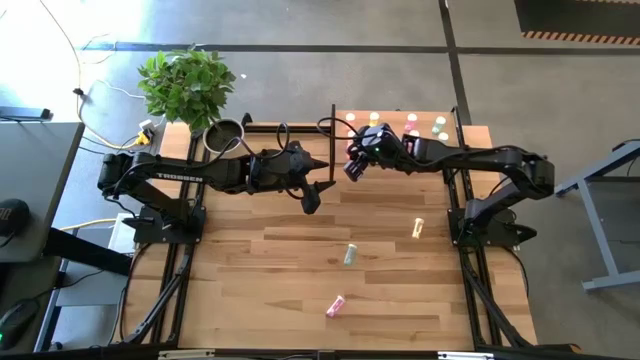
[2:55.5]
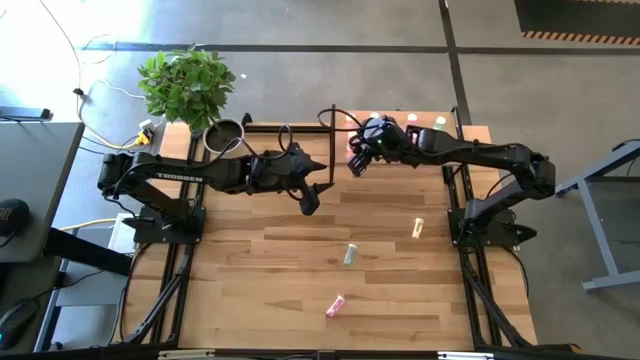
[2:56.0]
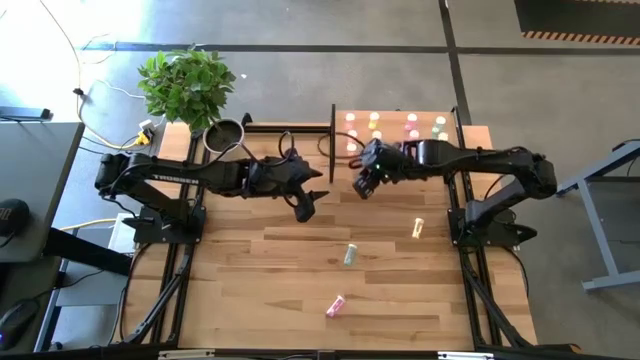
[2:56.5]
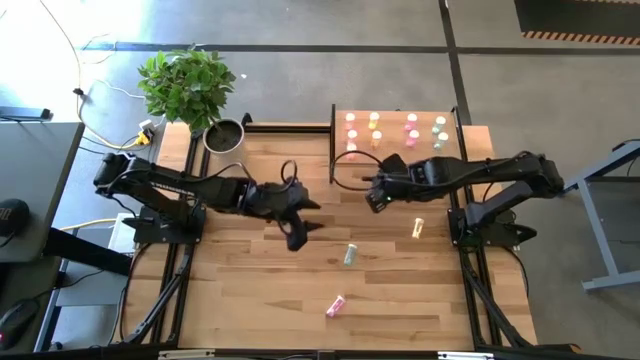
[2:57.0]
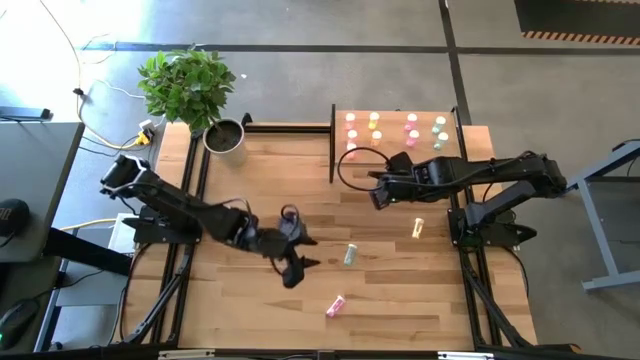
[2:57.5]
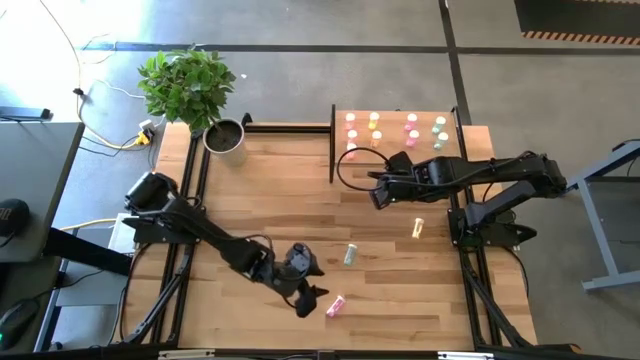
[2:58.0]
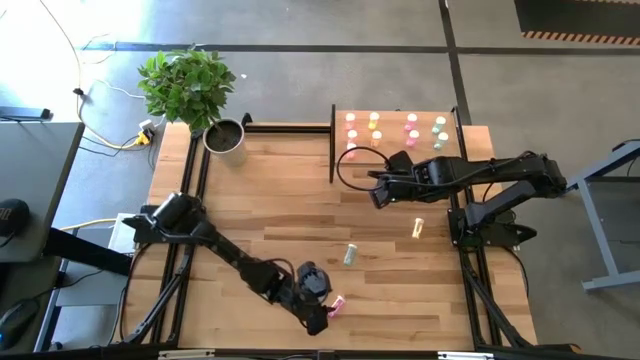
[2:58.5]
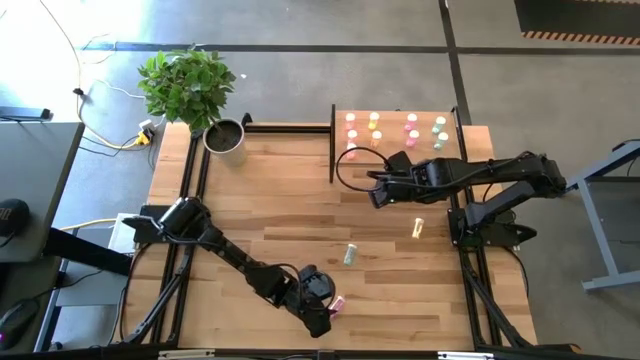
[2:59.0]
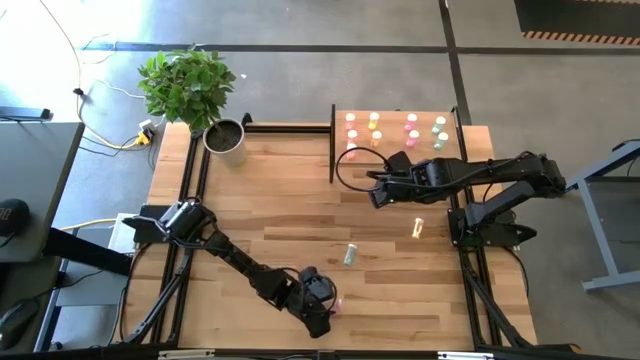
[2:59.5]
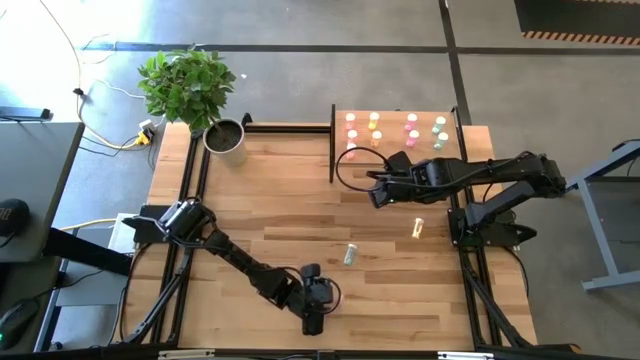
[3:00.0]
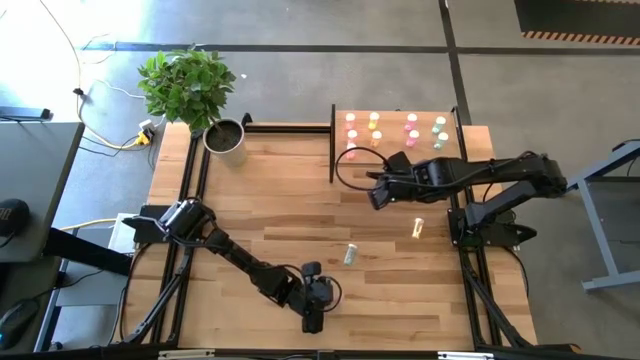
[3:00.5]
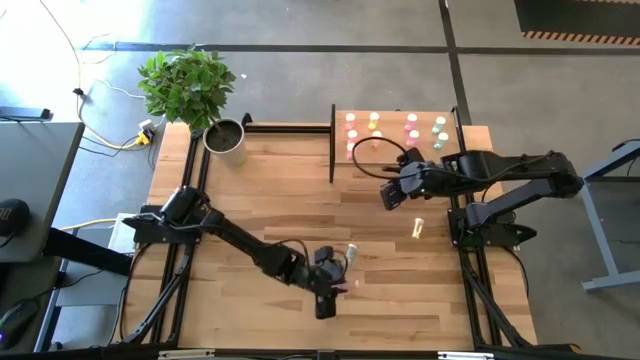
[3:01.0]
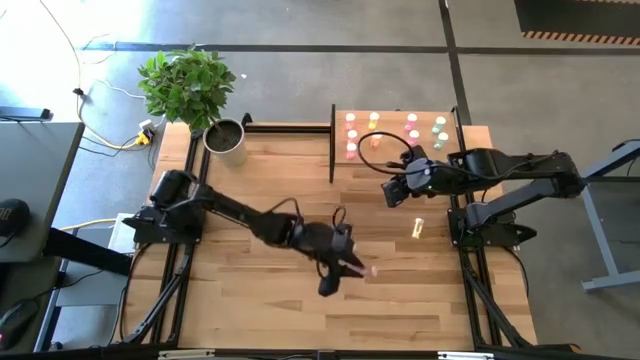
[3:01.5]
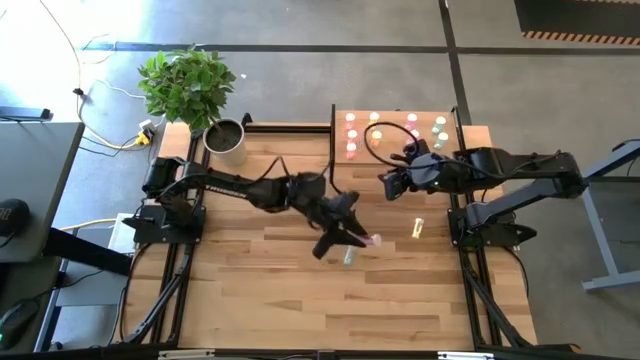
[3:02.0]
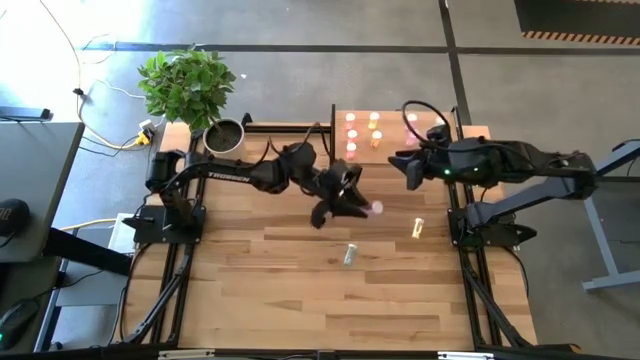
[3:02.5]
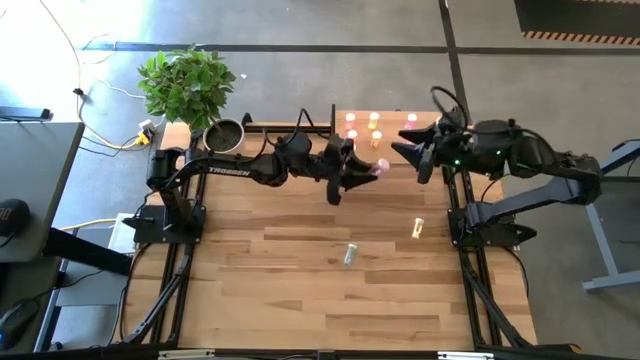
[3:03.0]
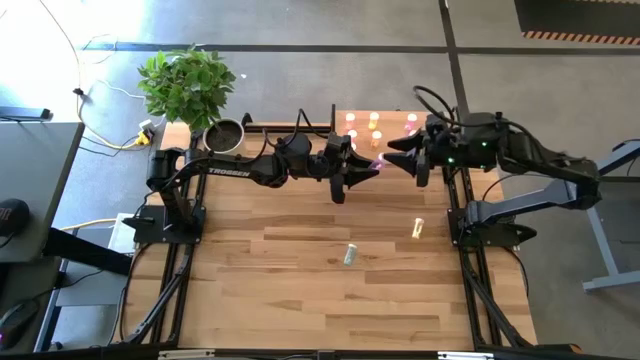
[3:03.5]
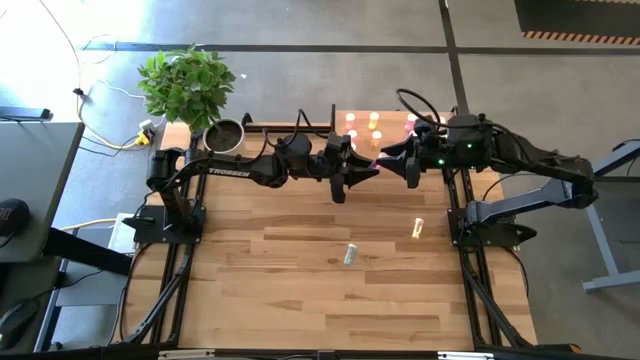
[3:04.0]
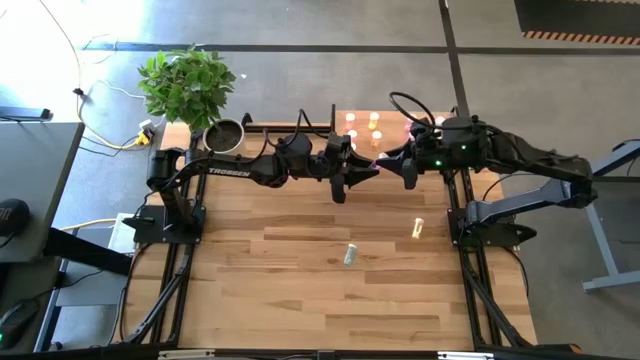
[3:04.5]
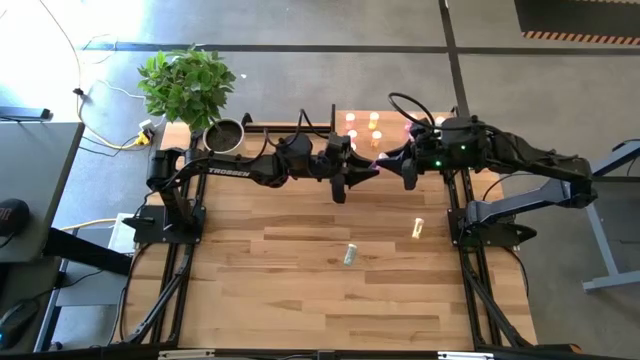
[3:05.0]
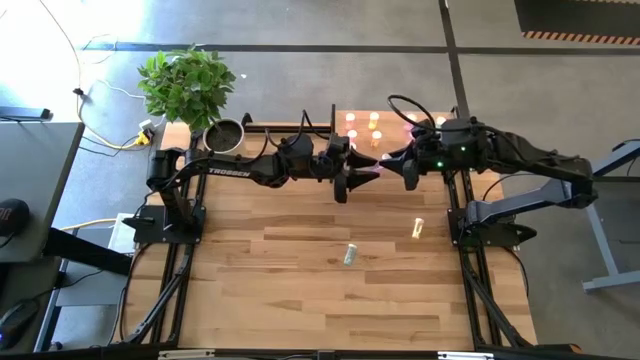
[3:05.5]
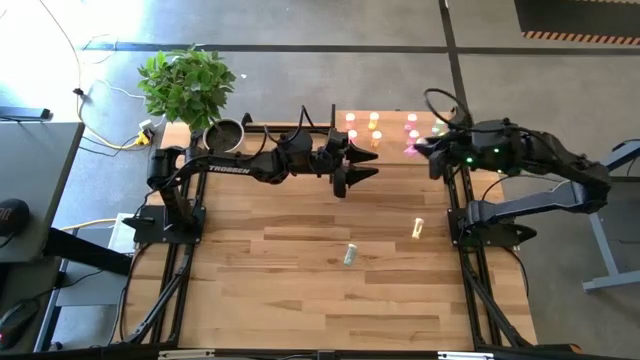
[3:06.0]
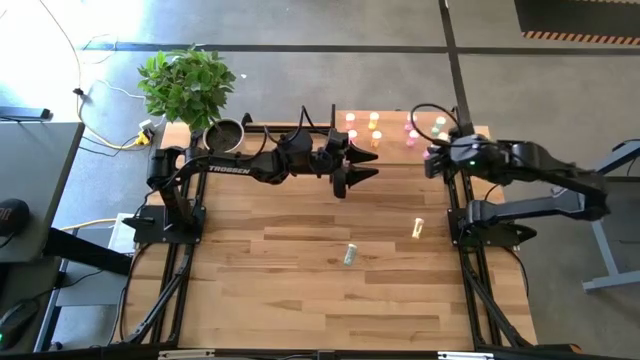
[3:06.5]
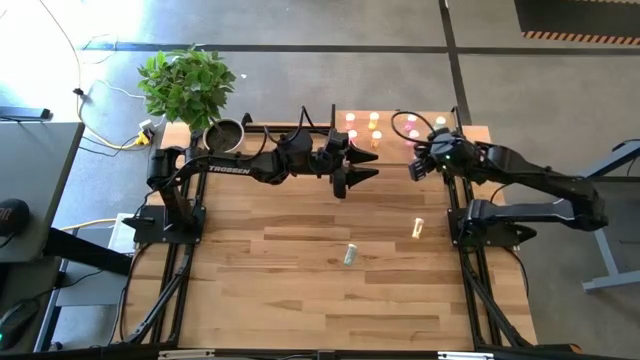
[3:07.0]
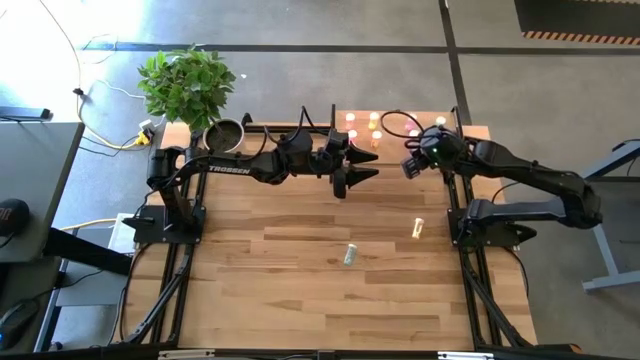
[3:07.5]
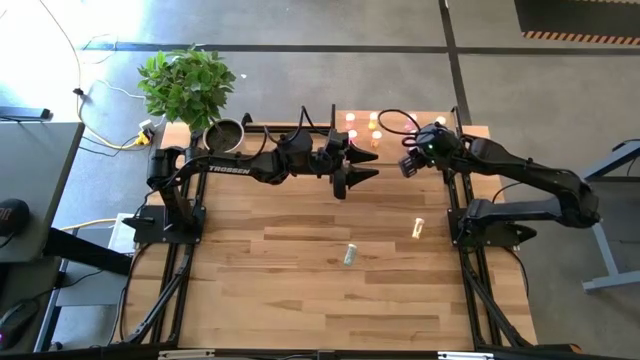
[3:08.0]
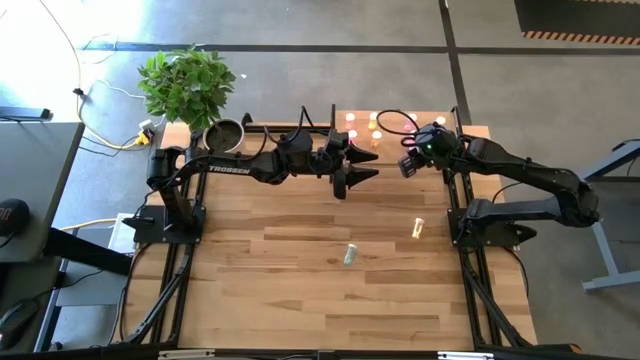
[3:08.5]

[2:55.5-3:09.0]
Task: Pick and place medicine bottles onto shelf by color
Put the violet medicine bottle aligned with the other violet medicine bottles on the shelf

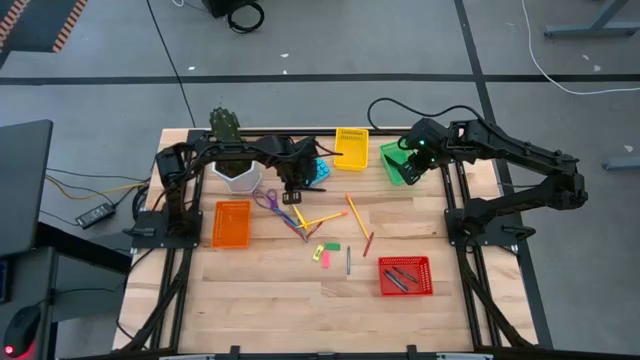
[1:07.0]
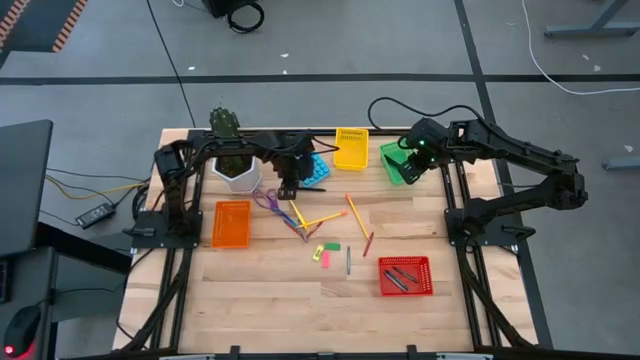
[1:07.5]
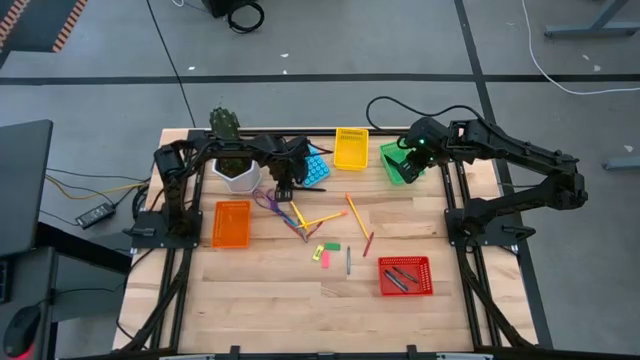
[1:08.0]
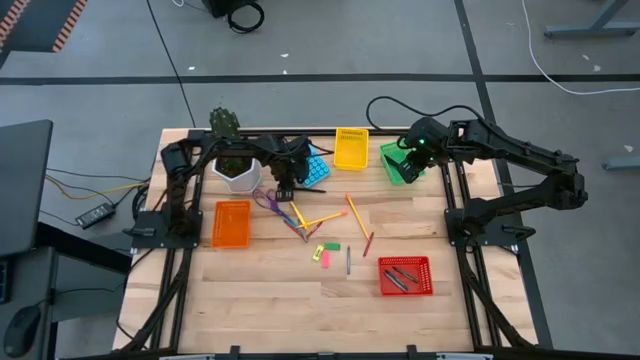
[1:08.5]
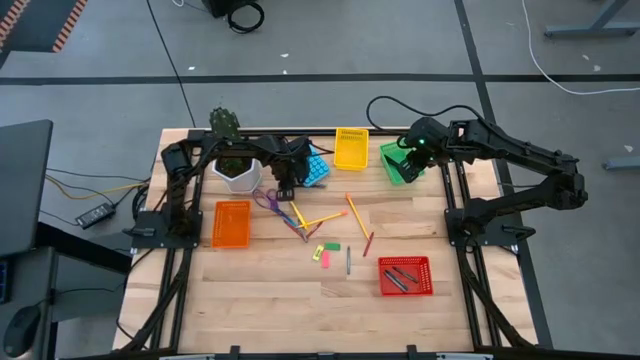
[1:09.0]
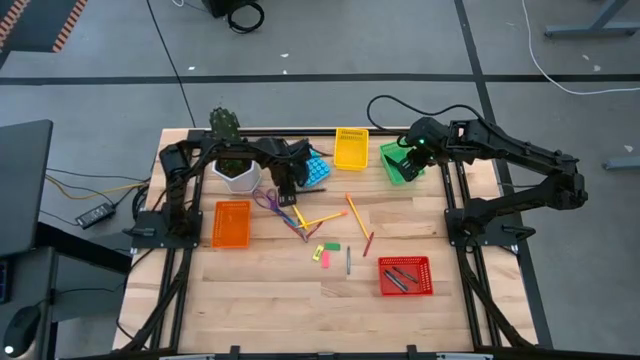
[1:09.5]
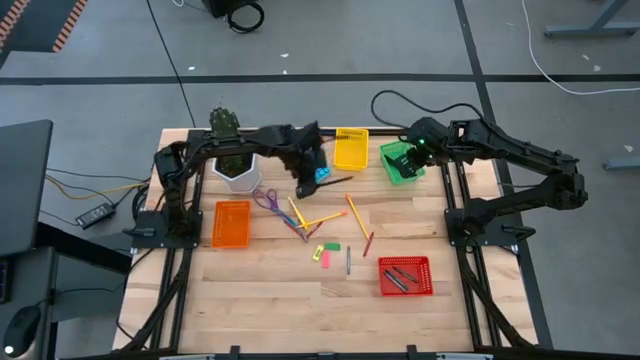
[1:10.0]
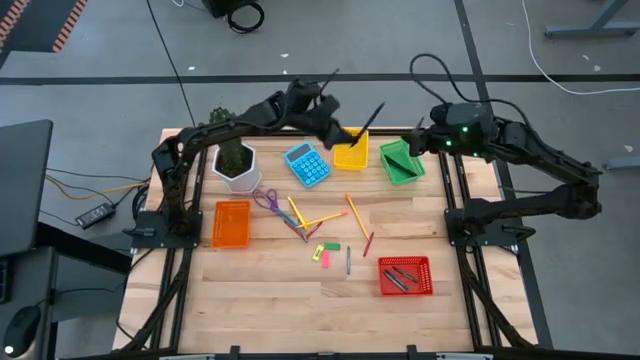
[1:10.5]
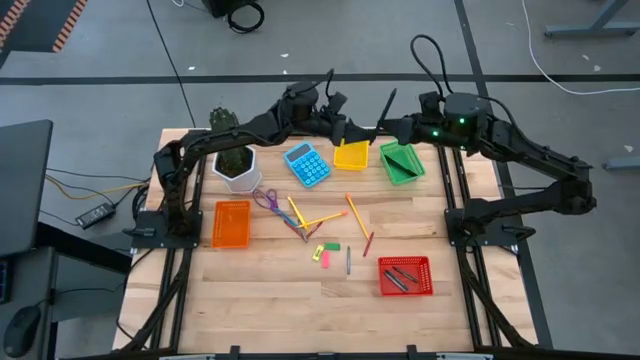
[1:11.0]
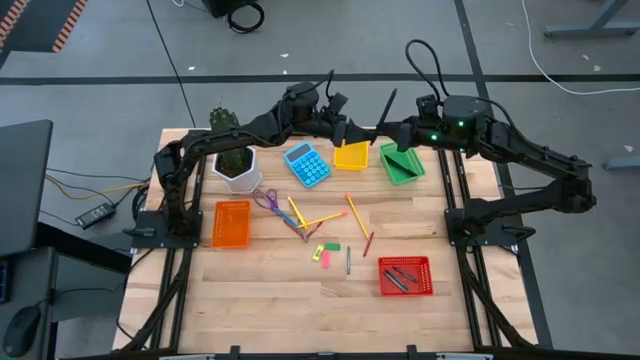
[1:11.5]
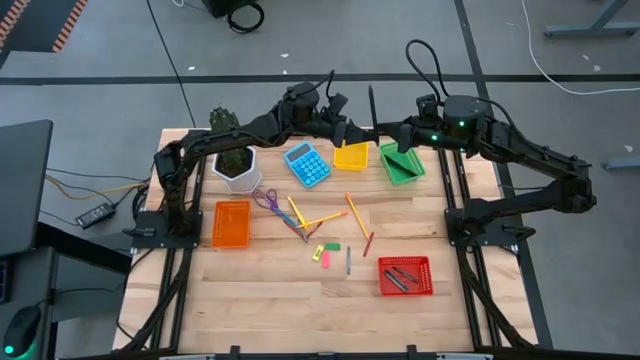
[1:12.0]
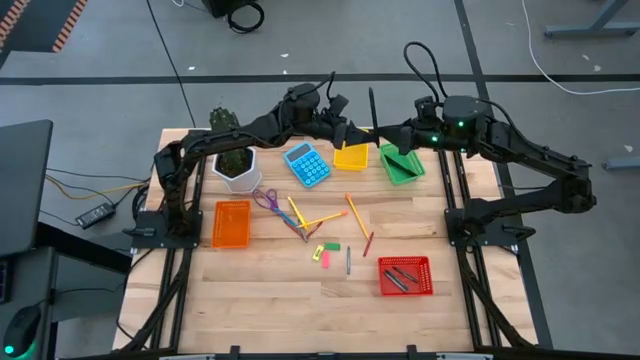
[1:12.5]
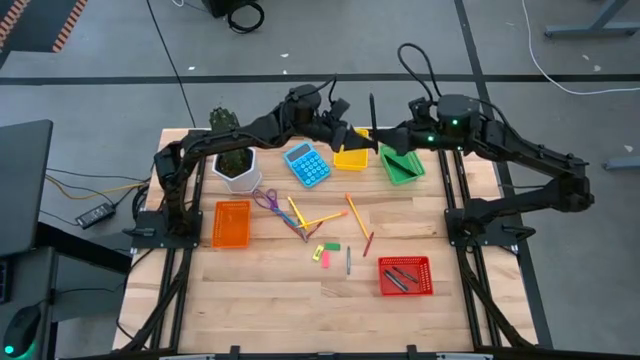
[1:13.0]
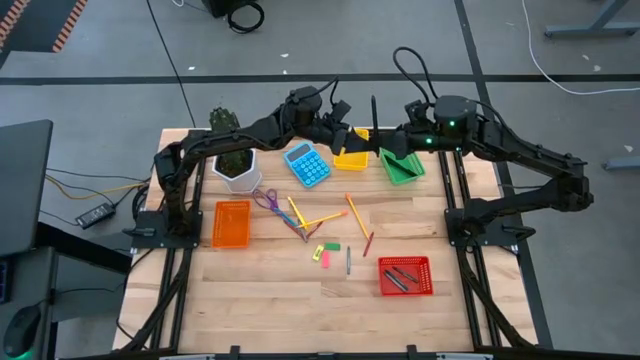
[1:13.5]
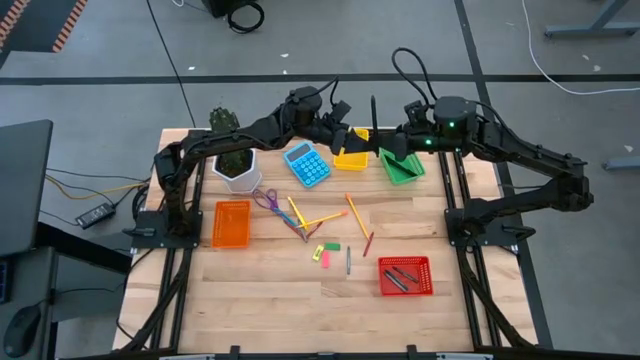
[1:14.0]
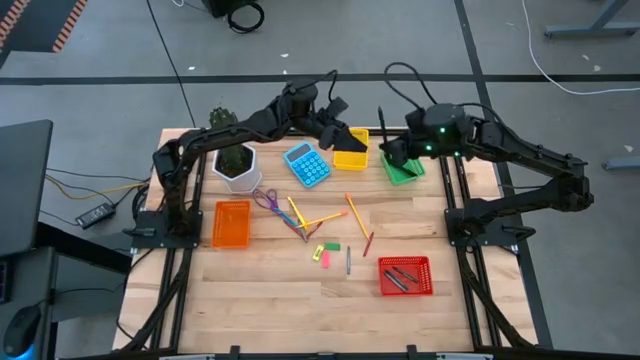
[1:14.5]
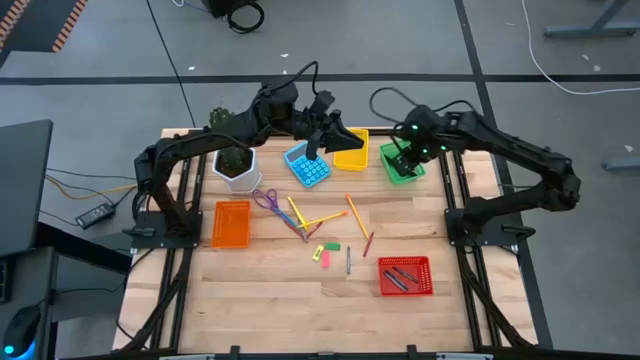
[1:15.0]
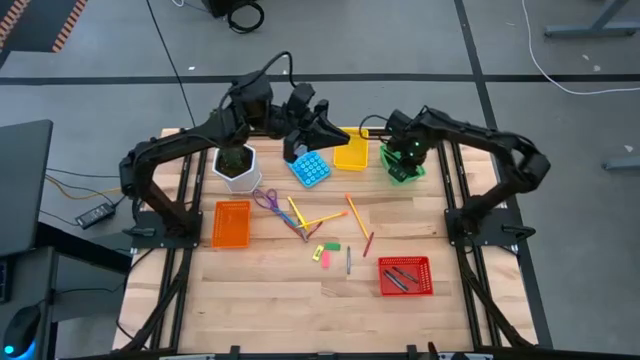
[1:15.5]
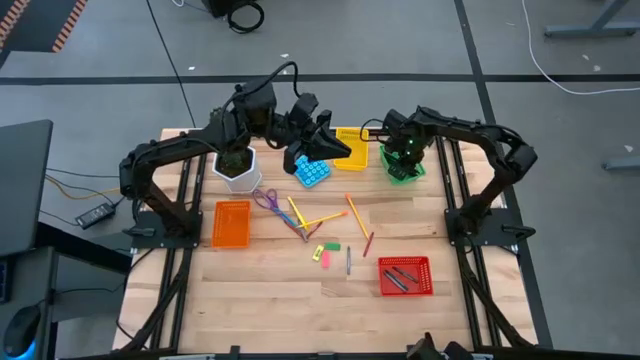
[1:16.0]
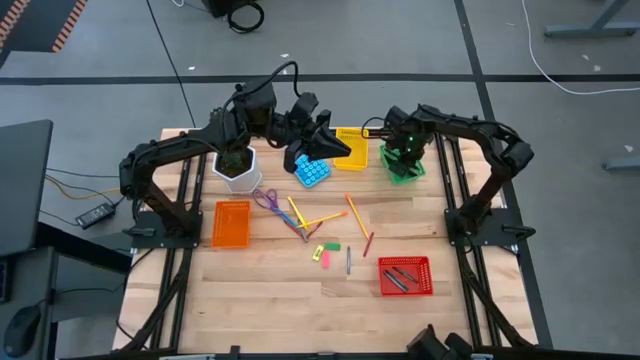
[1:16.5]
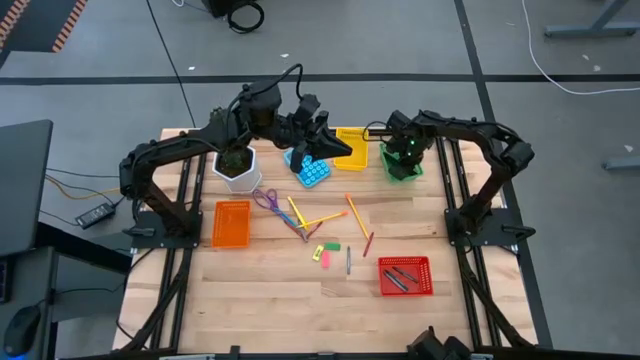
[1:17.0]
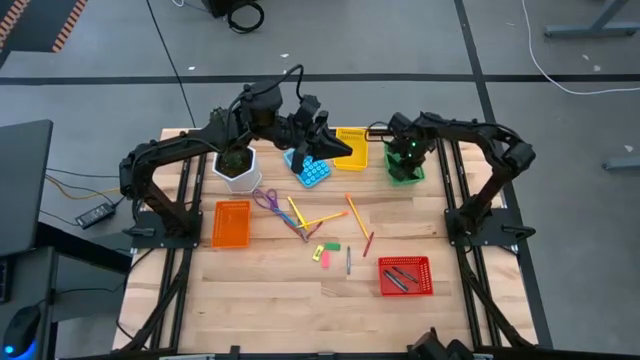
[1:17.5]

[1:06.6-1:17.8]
Task: Sort crayons/erasers/pens/pencils in bins
Put the black pen into the green bin
